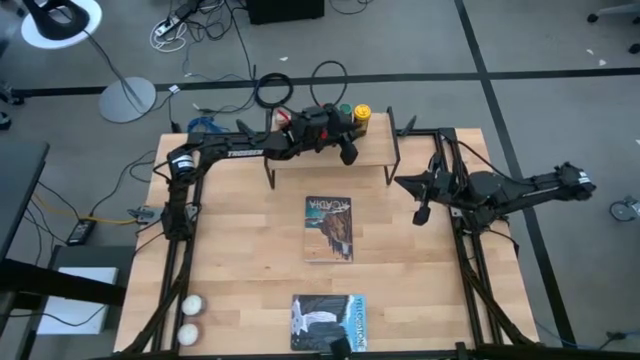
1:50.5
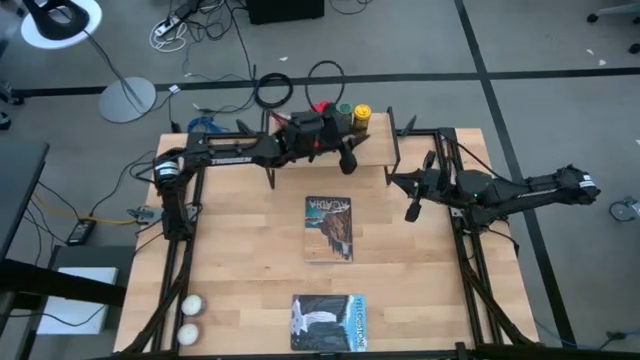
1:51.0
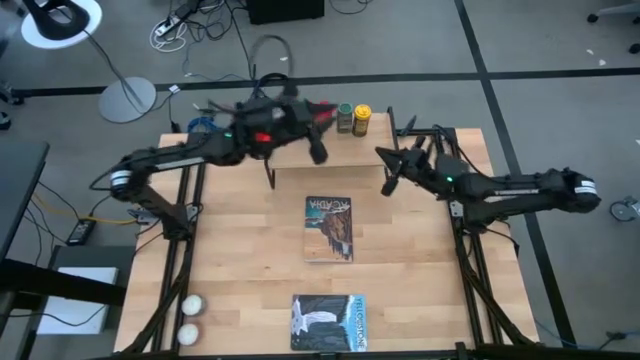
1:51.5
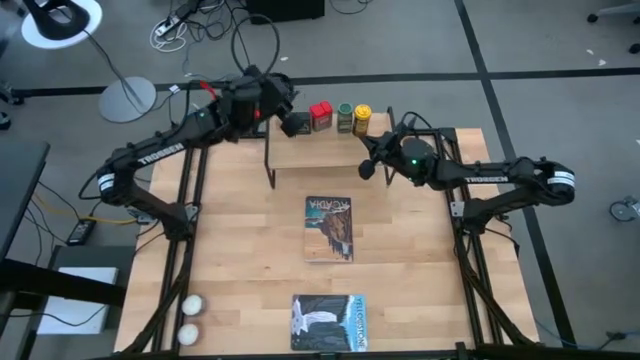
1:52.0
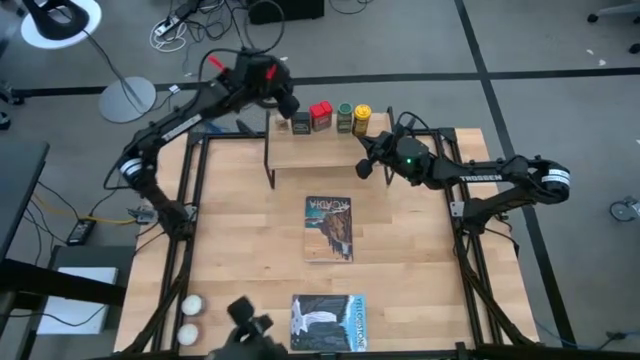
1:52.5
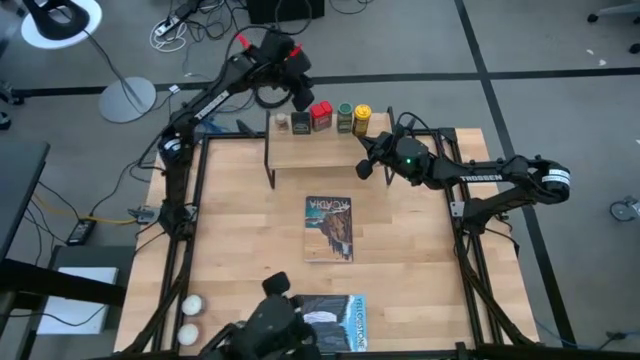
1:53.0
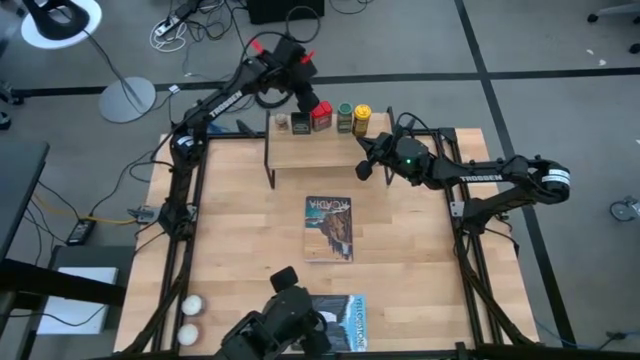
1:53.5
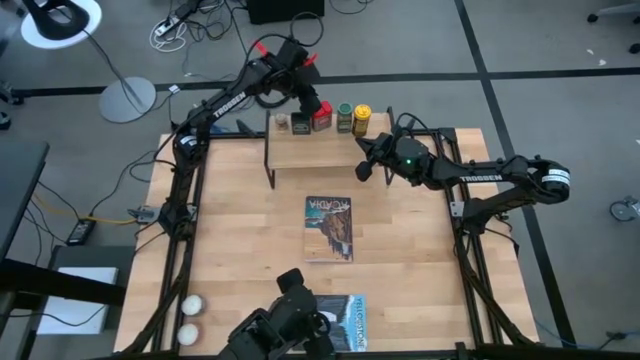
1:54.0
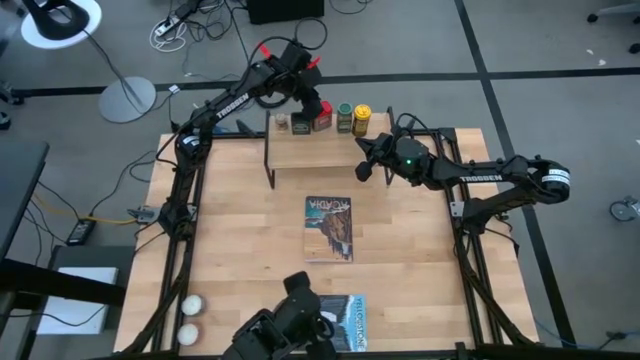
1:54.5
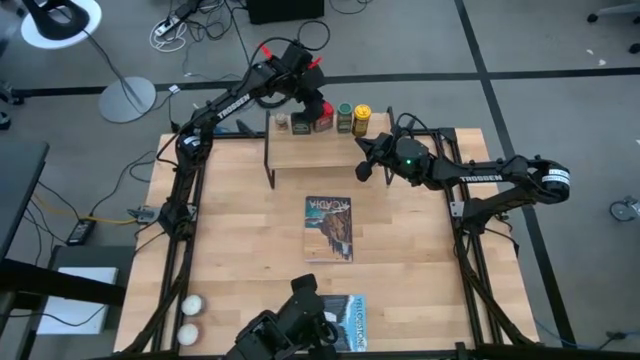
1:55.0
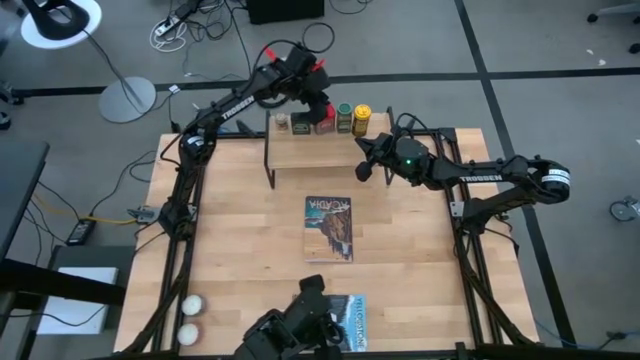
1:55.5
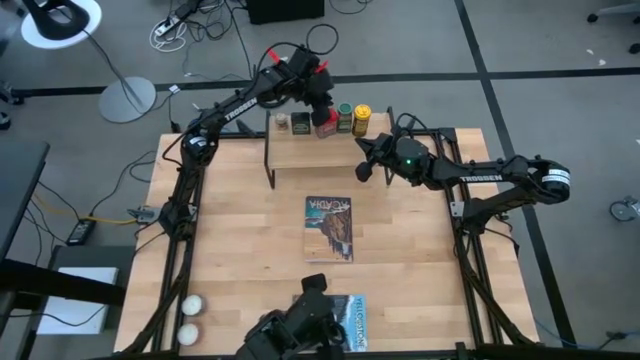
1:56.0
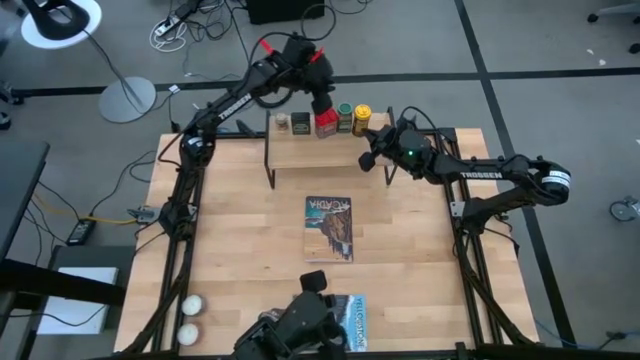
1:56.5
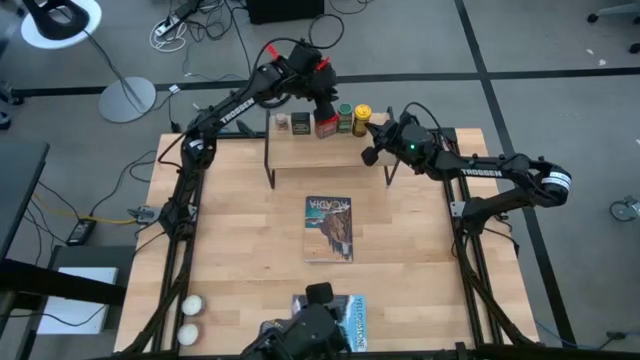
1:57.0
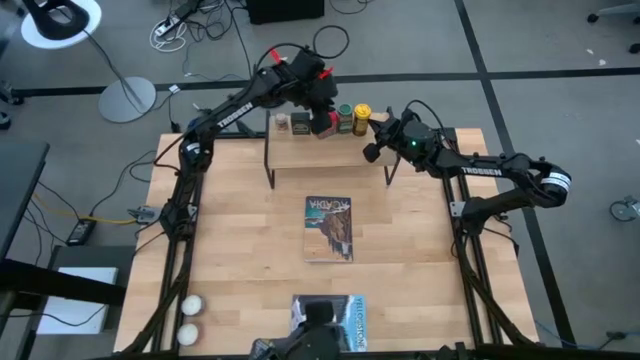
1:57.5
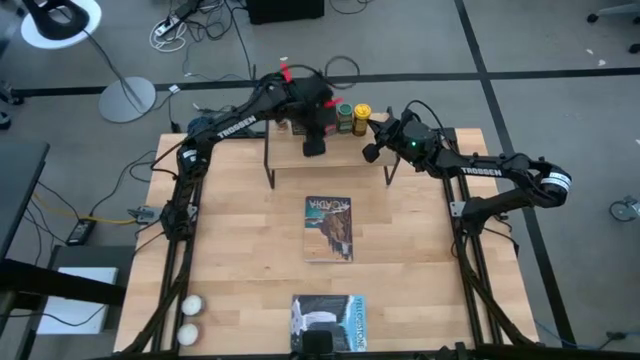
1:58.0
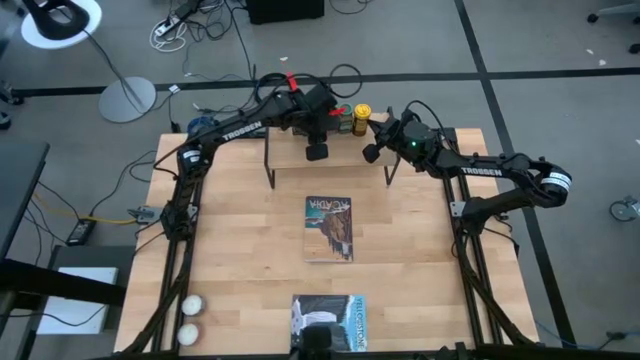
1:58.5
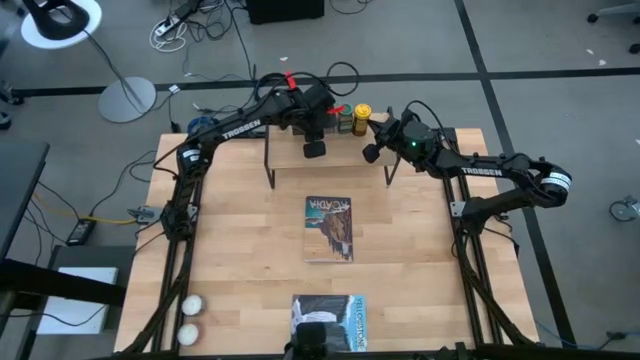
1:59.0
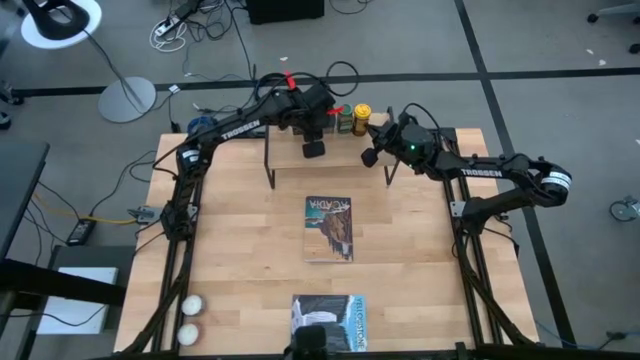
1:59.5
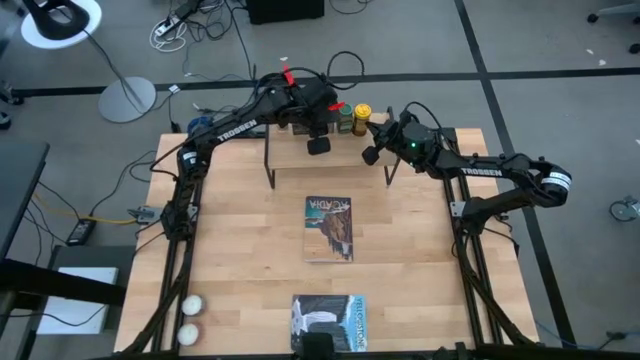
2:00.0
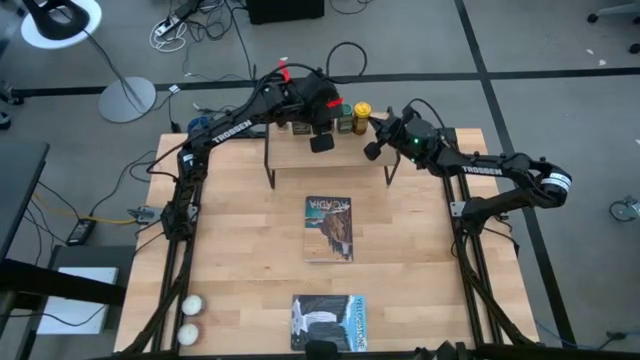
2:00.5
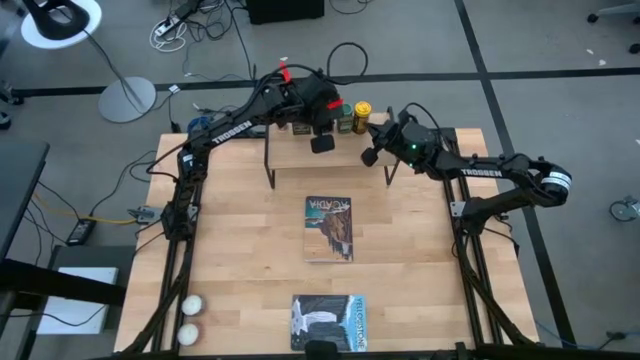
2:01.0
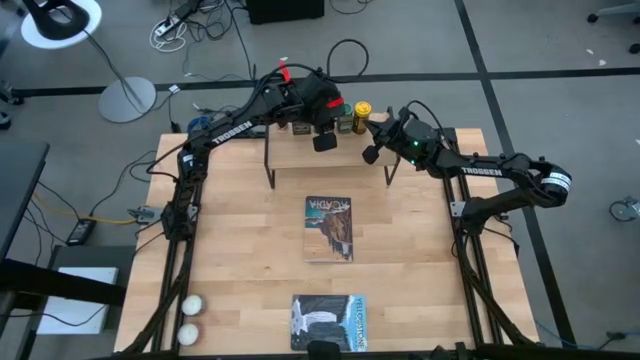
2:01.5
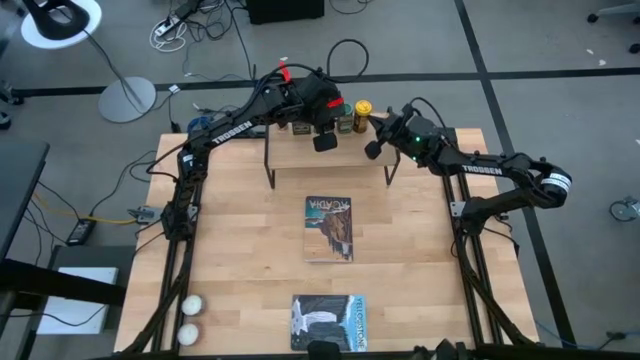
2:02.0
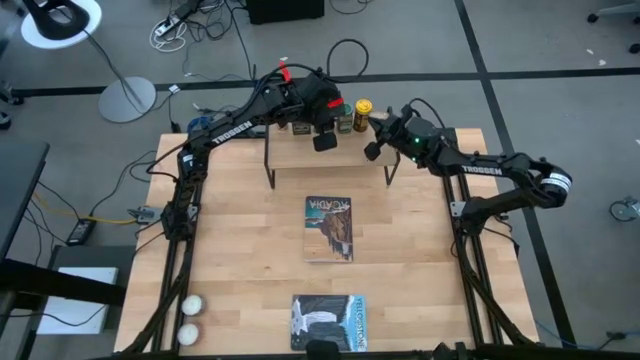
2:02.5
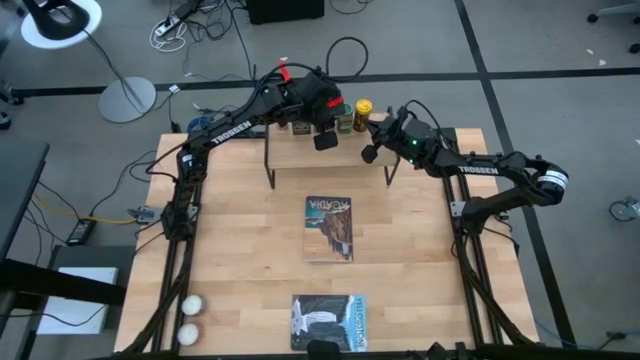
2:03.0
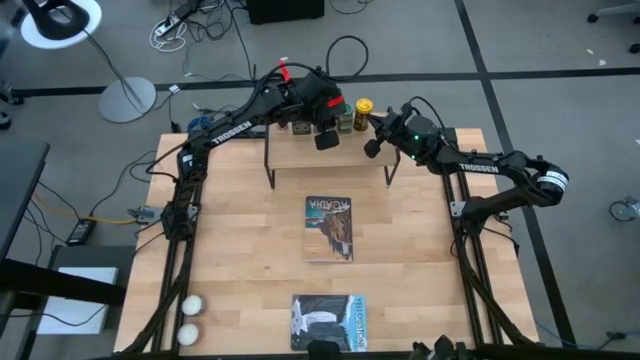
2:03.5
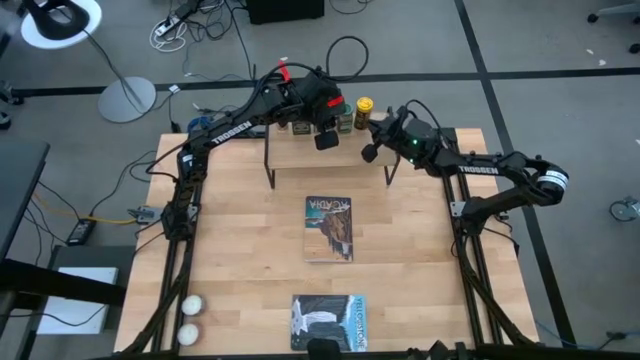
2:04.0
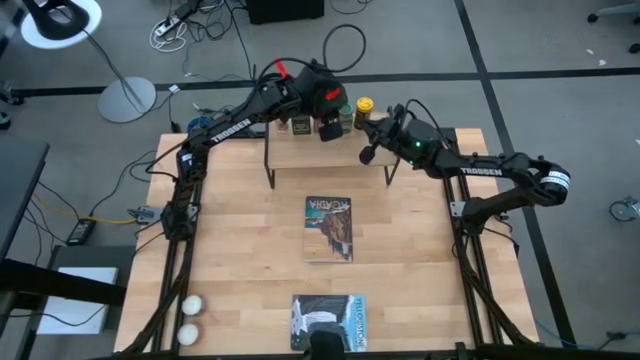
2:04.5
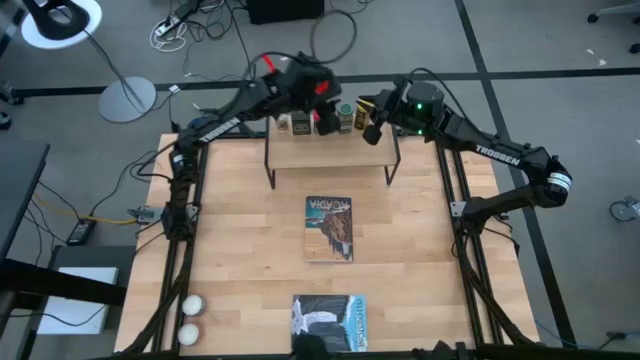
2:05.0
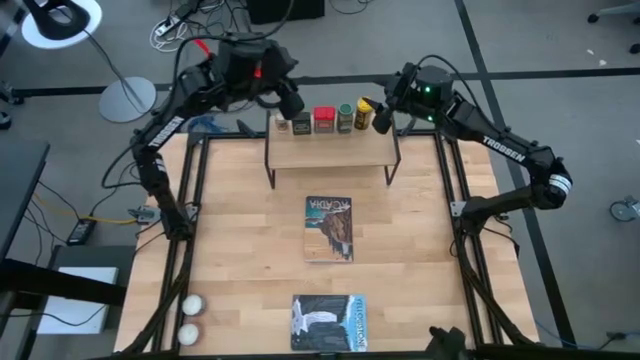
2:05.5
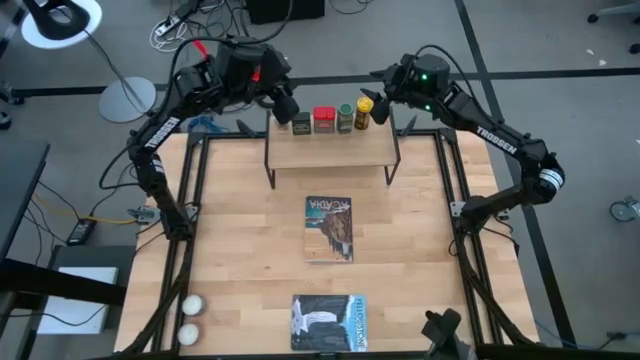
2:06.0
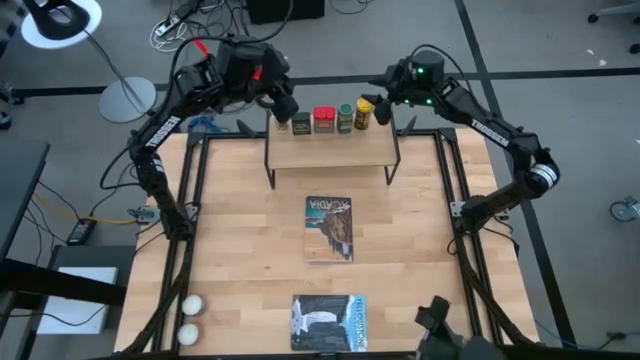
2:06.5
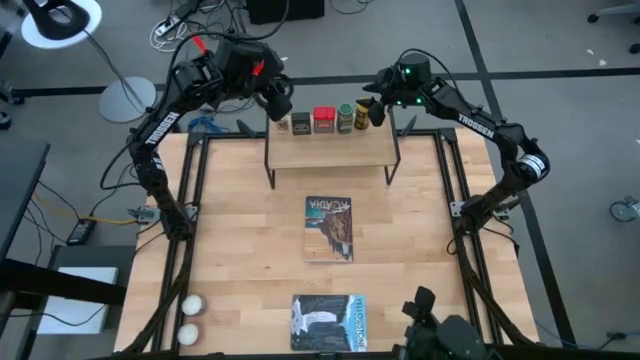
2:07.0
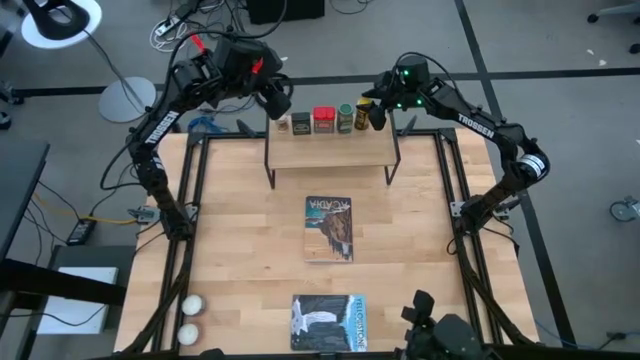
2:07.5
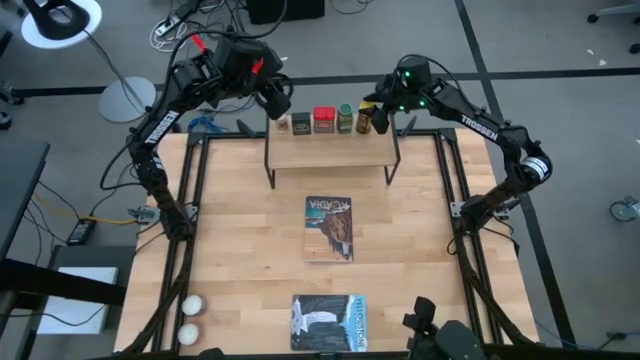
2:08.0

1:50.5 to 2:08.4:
Task: Shelf spices
Adjust the seasoning can and bottle on the shelf

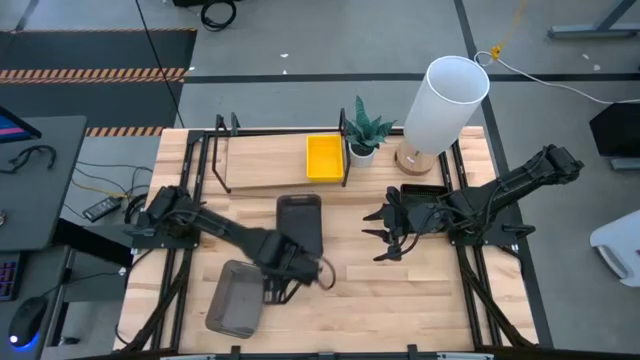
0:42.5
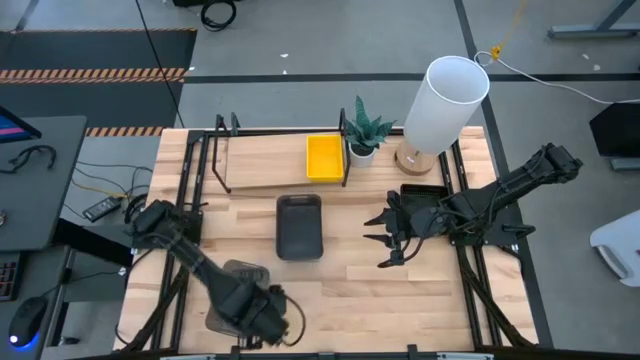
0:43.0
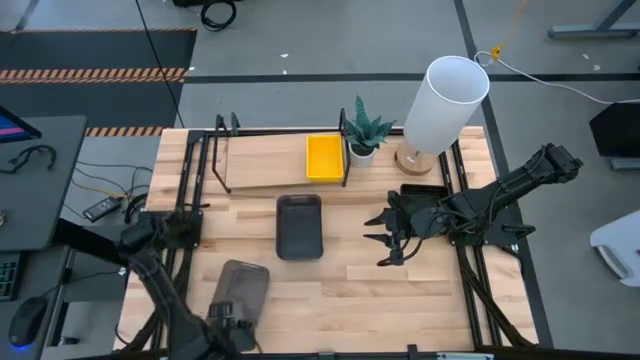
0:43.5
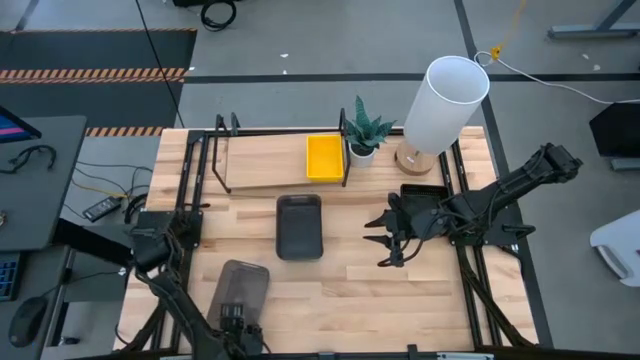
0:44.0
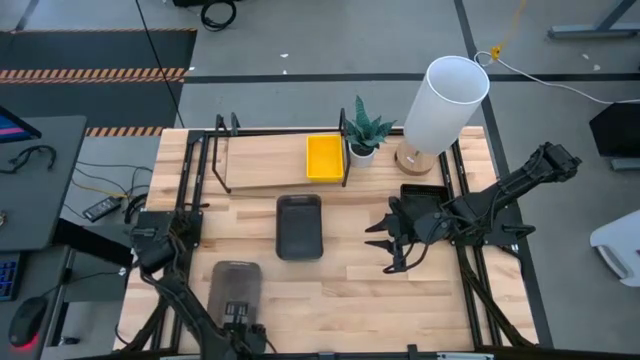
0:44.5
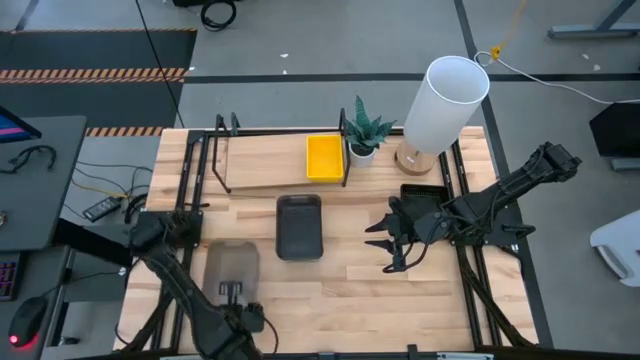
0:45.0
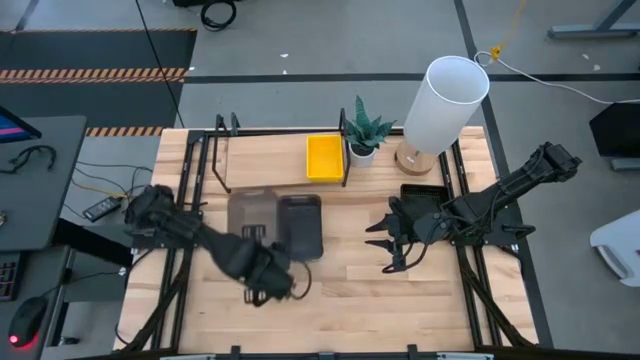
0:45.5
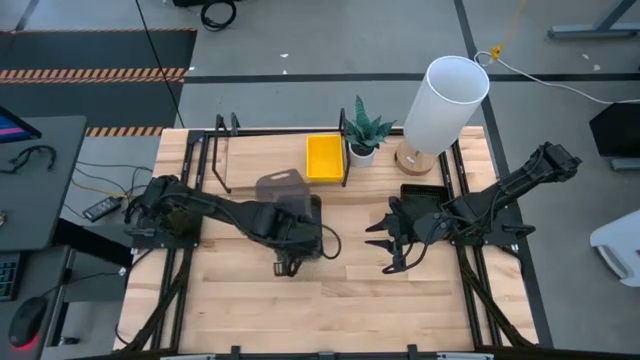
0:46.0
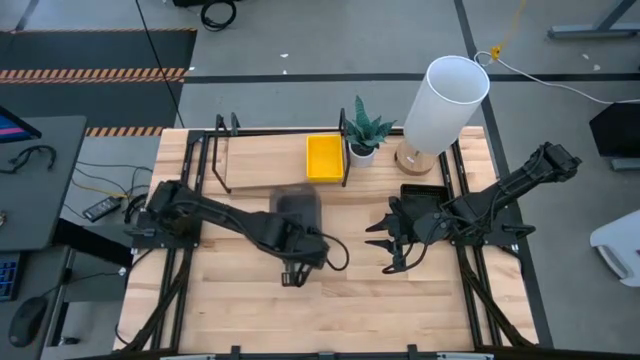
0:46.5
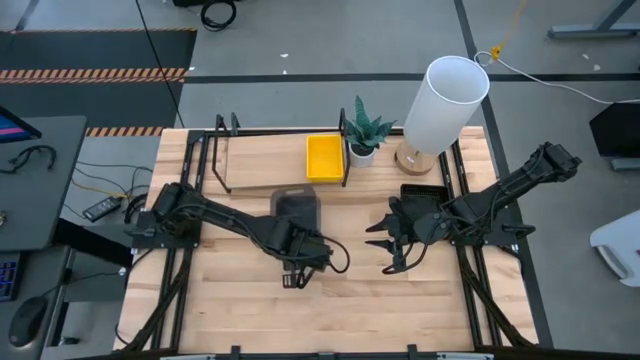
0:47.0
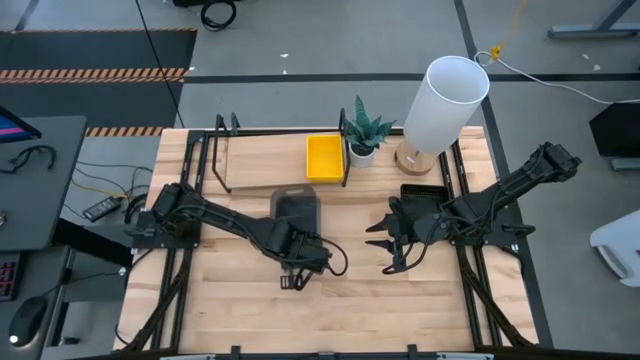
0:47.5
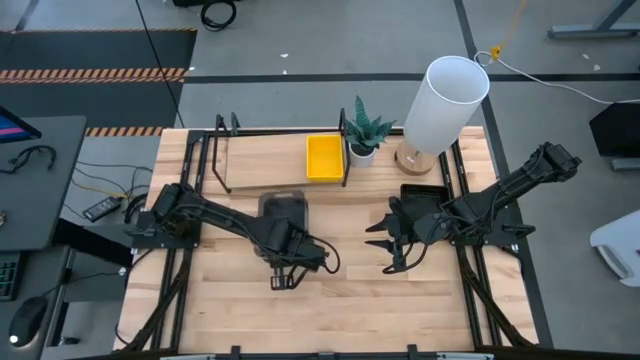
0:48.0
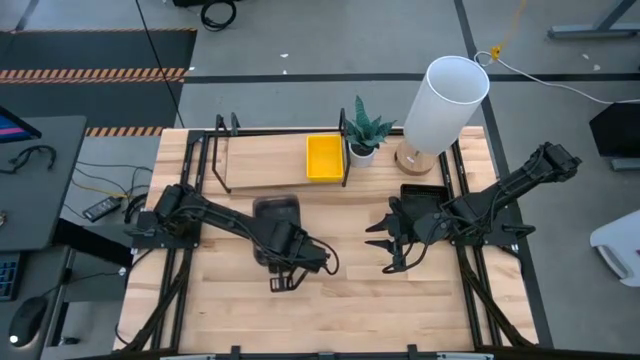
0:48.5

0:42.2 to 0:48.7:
Task: Stack baskets on shelf by color
Stack the bottom gray bin on the top of the top gray bins
